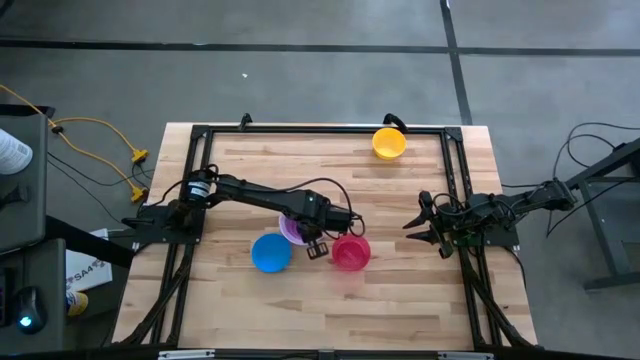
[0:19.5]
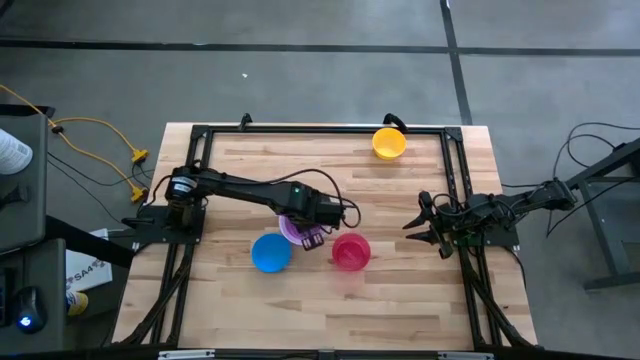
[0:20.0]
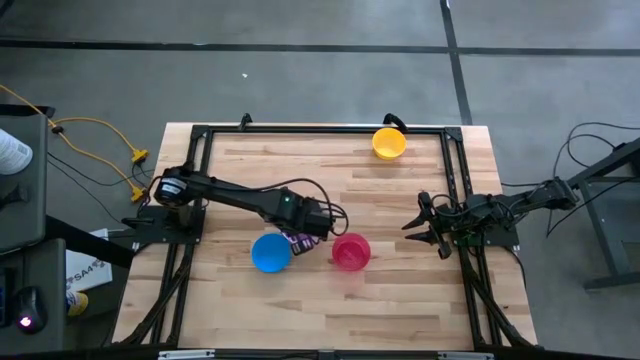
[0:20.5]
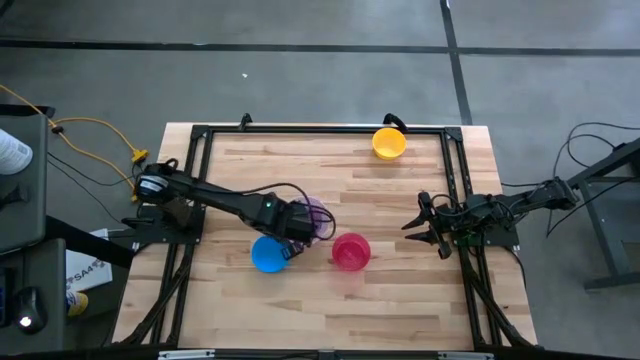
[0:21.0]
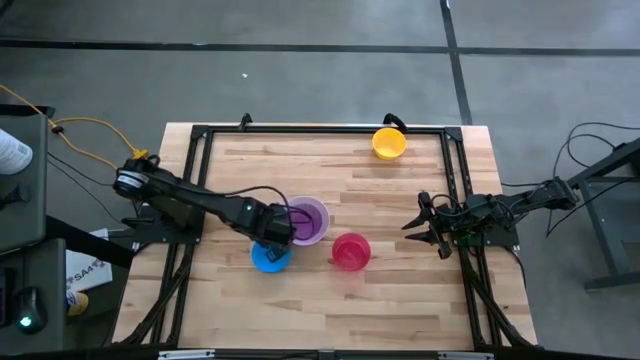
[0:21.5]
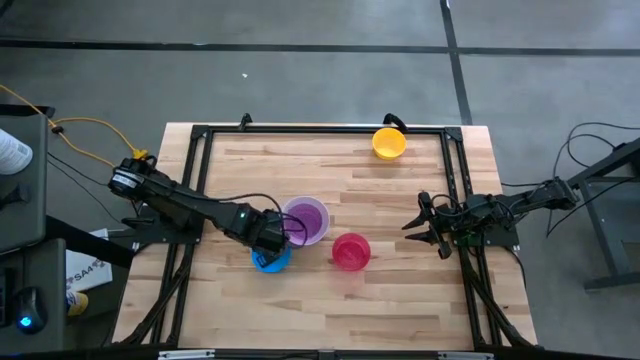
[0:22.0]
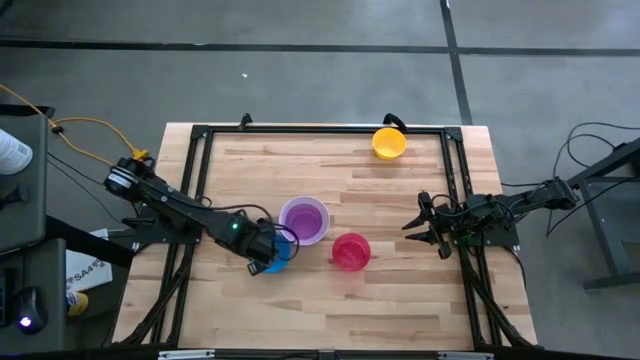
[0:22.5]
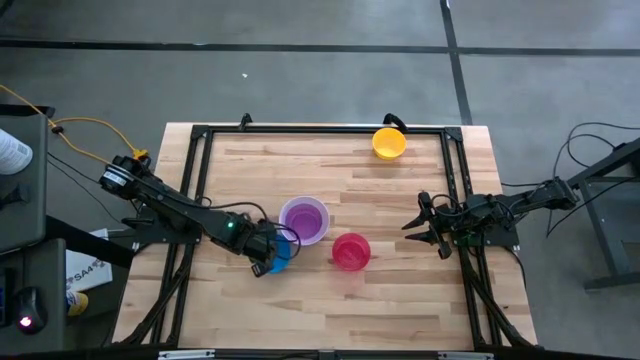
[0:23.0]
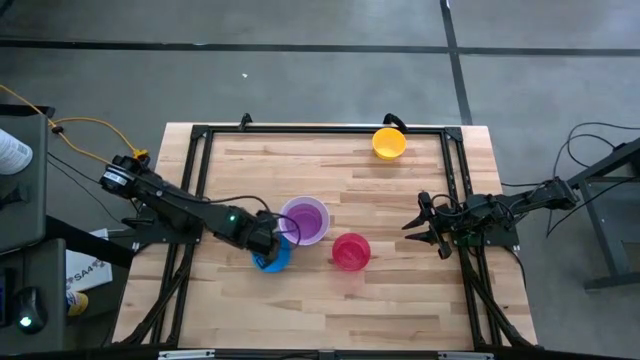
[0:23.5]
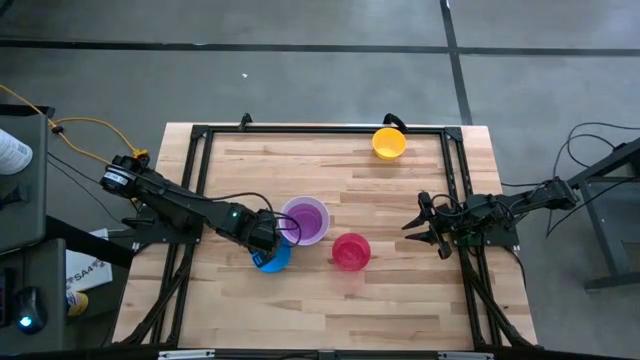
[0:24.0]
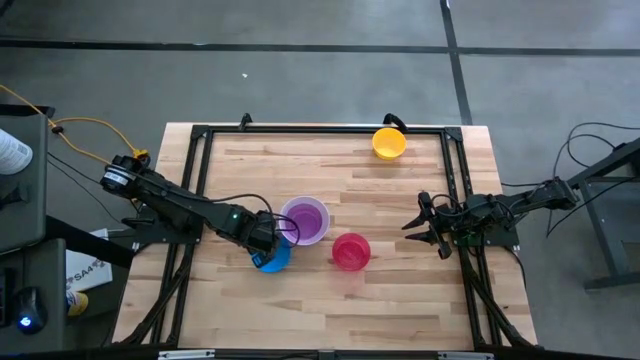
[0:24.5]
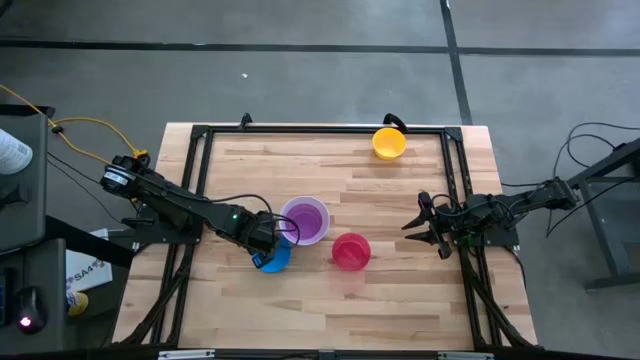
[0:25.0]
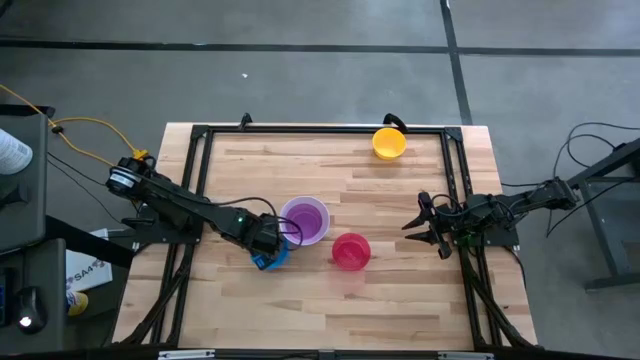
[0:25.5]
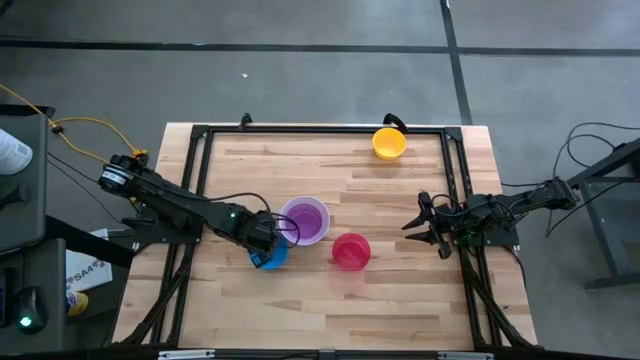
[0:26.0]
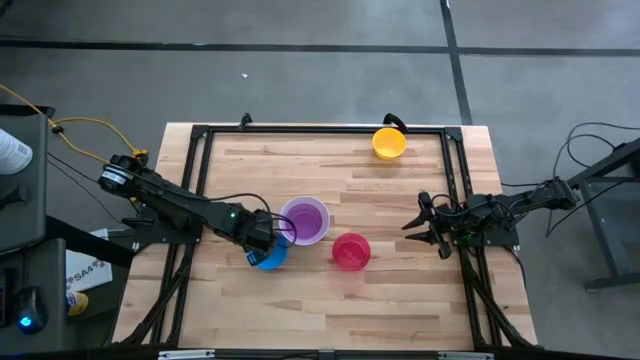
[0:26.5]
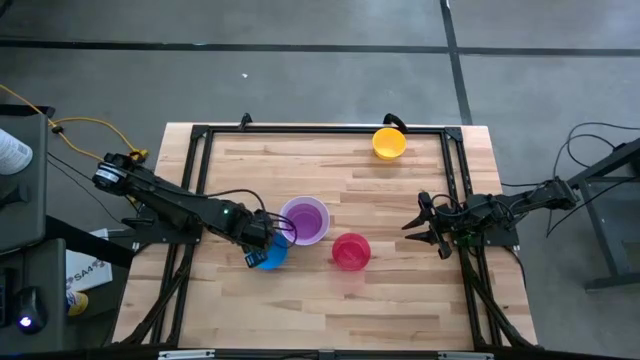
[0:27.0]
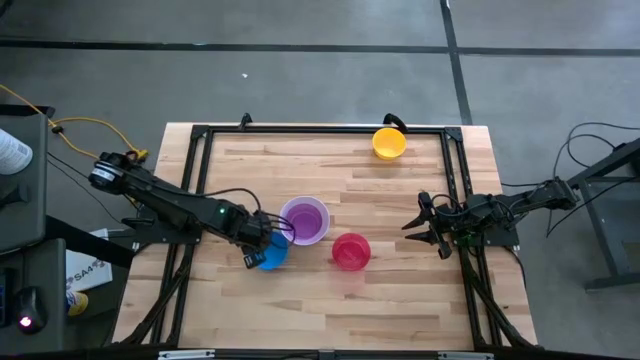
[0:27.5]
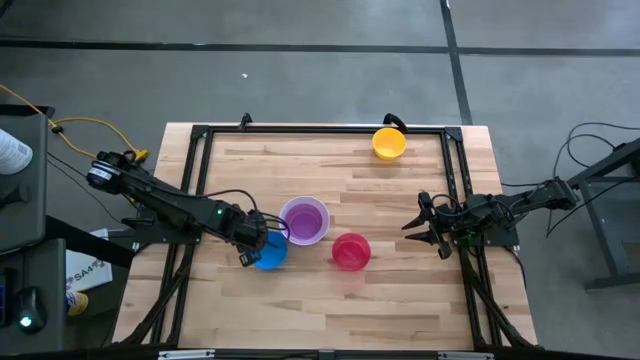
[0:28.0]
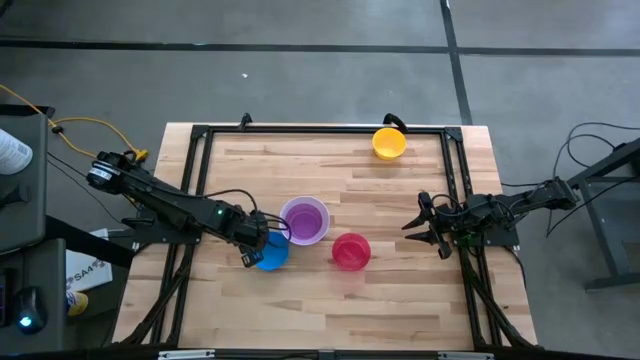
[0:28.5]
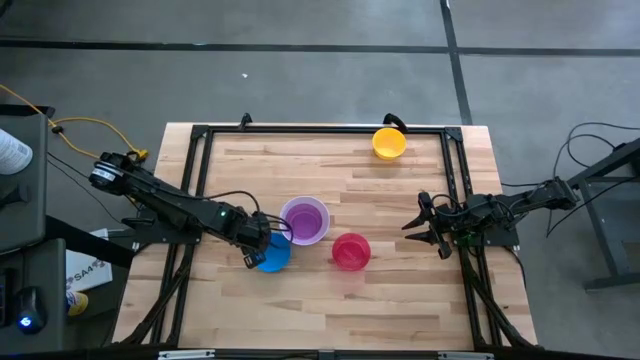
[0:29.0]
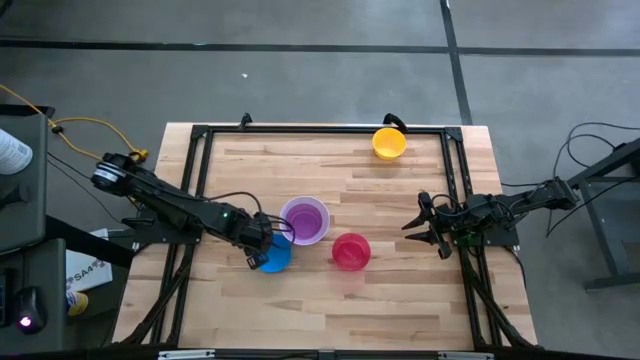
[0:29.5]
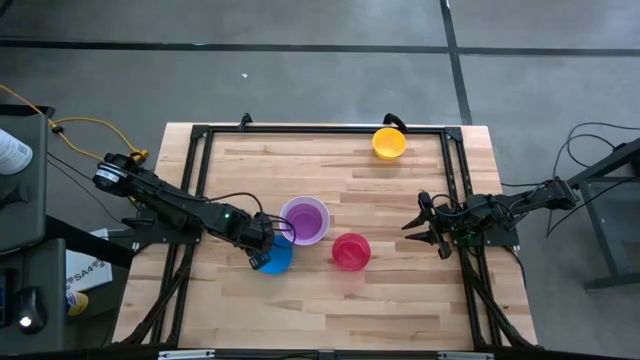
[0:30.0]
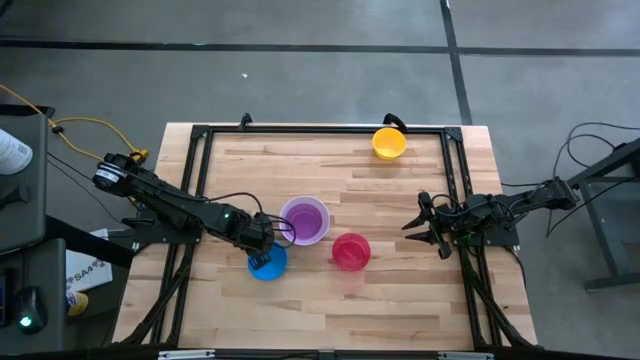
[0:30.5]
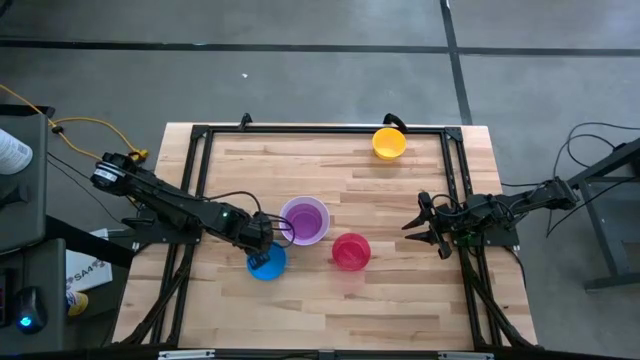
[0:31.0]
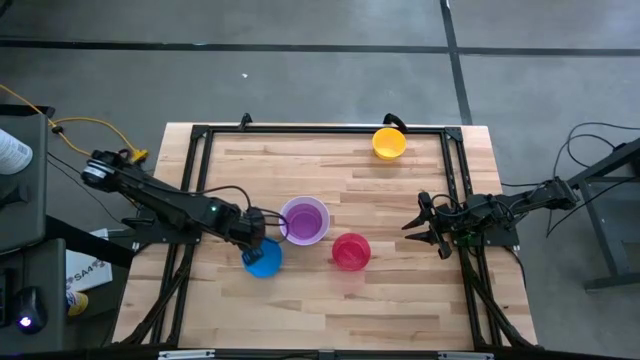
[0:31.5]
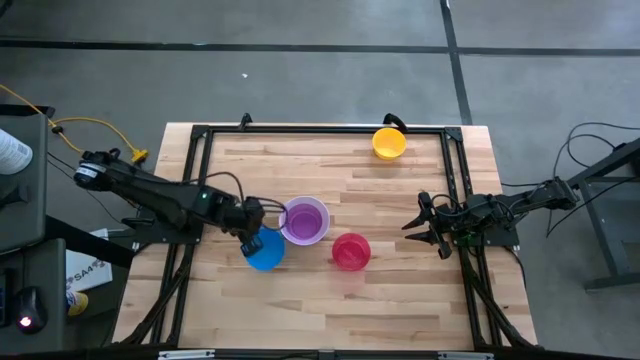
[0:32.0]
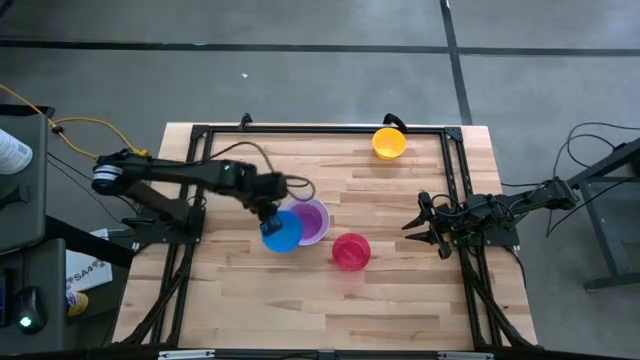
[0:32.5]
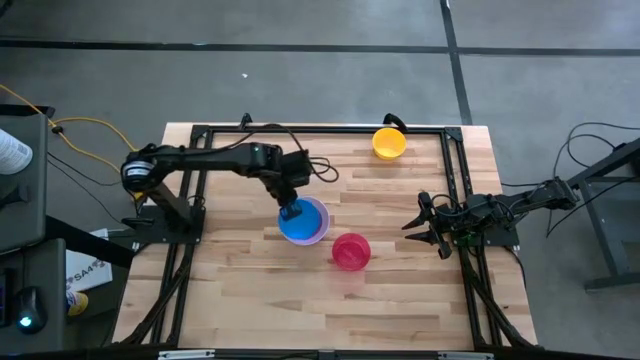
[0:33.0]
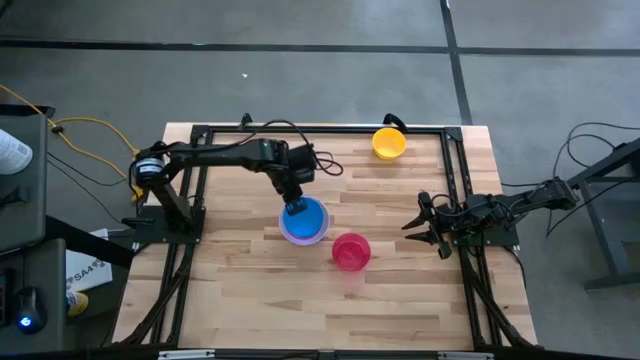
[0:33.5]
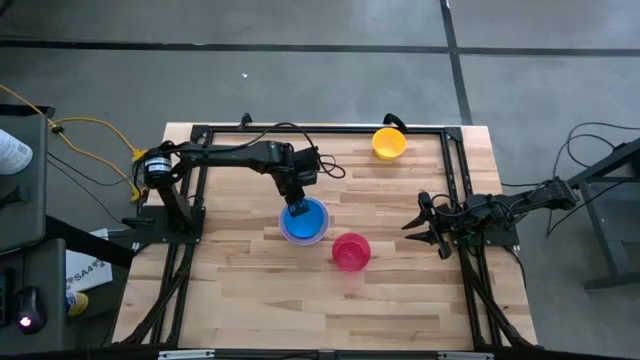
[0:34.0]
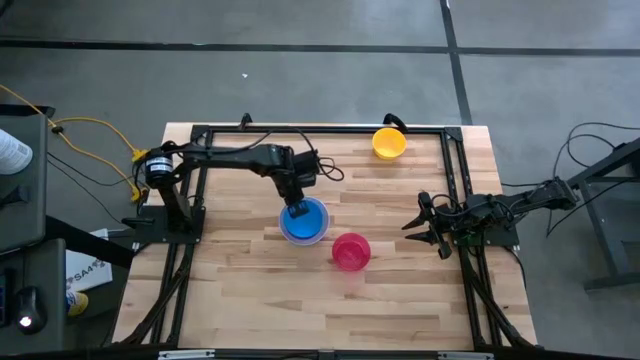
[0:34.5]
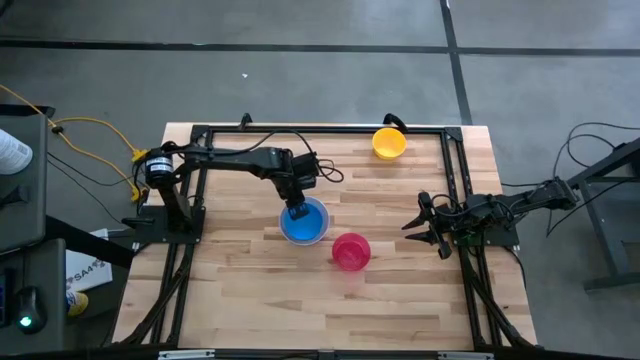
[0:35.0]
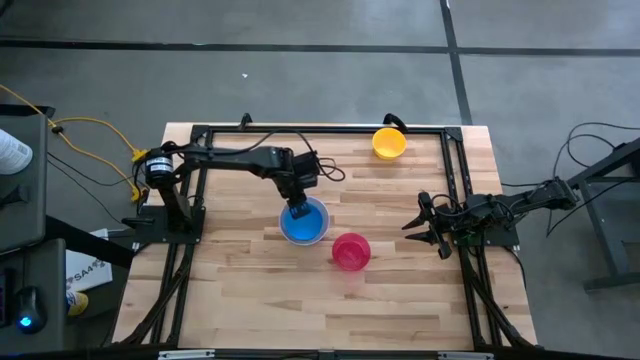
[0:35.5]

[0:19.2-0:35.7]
Stack the blue bowl on top of the violet bowl
